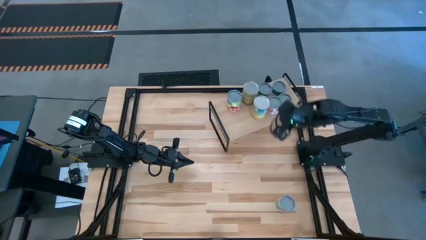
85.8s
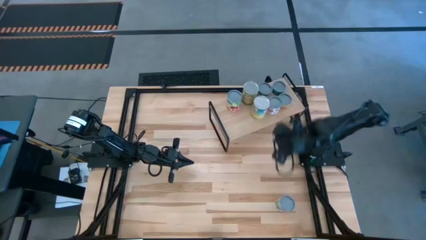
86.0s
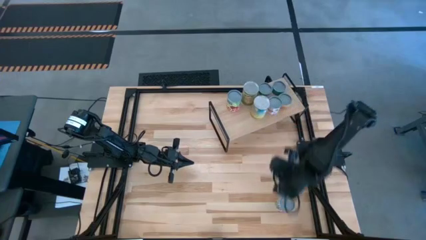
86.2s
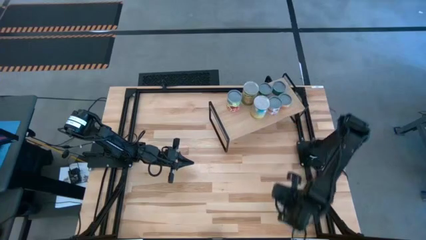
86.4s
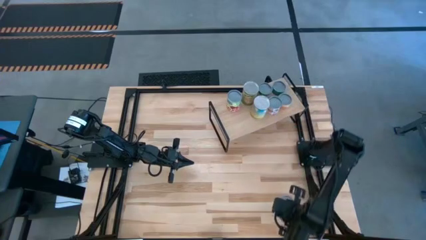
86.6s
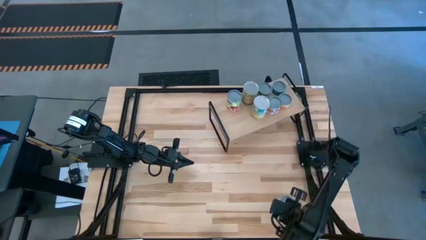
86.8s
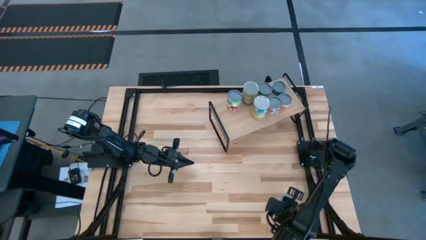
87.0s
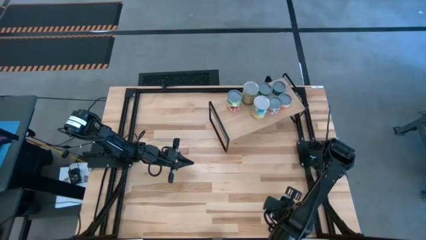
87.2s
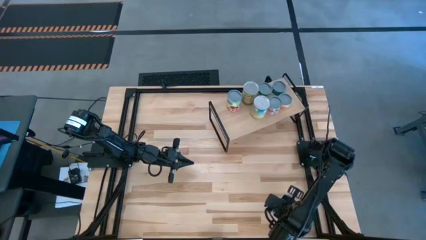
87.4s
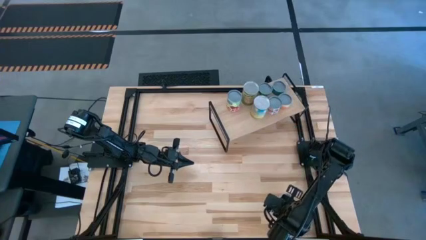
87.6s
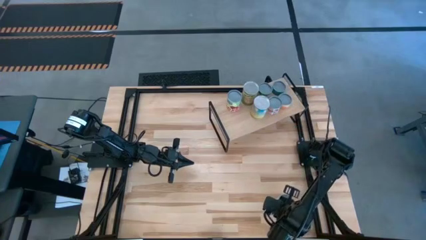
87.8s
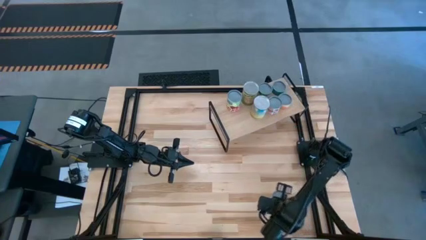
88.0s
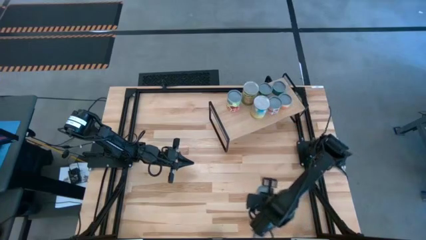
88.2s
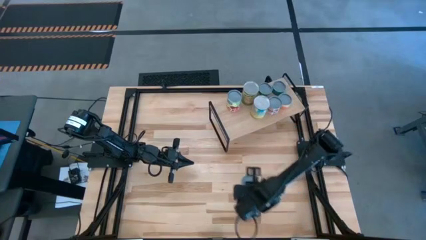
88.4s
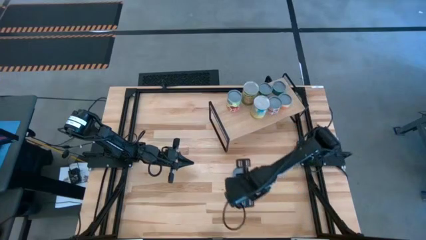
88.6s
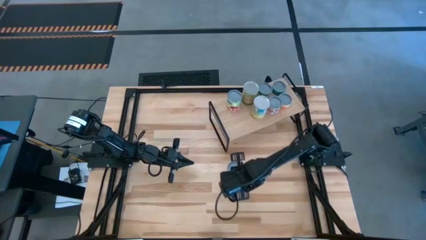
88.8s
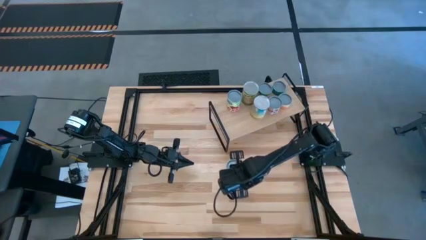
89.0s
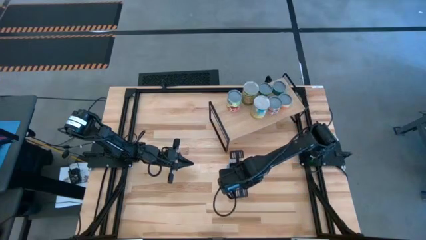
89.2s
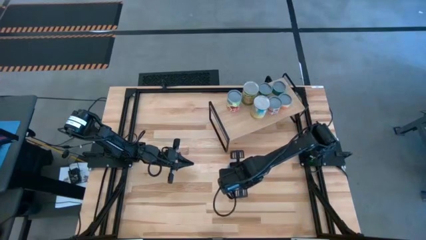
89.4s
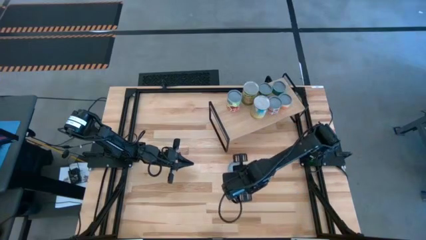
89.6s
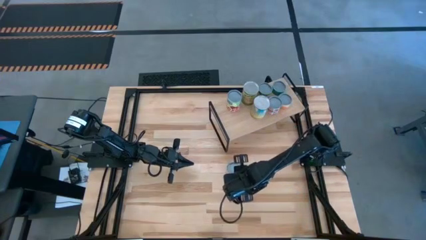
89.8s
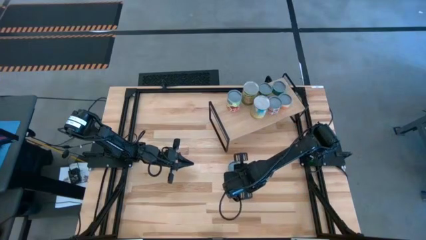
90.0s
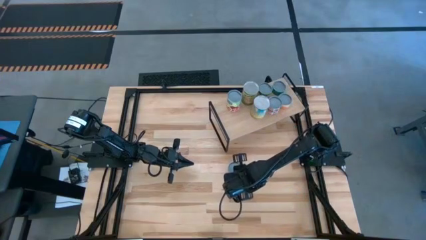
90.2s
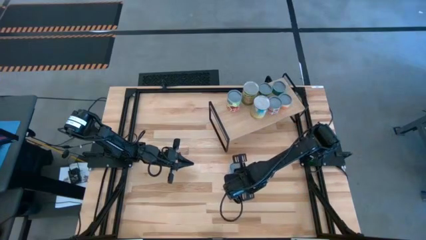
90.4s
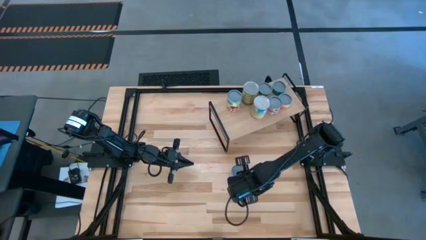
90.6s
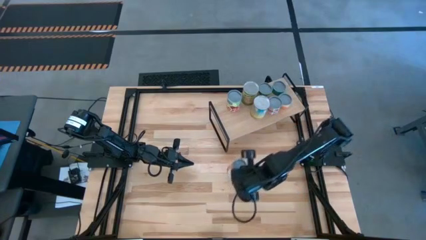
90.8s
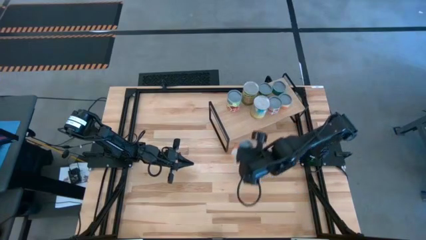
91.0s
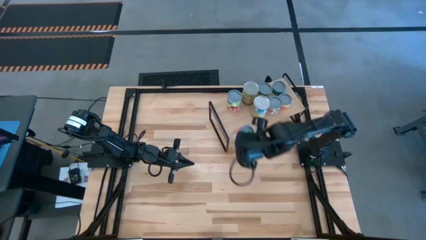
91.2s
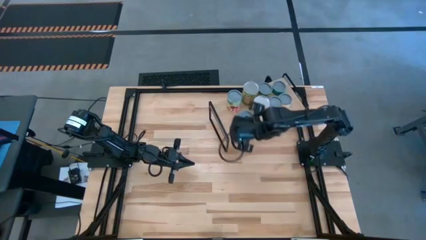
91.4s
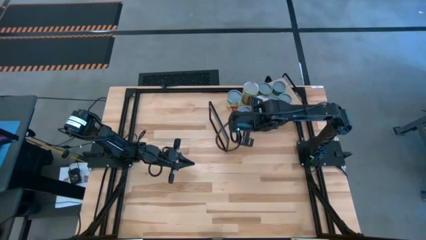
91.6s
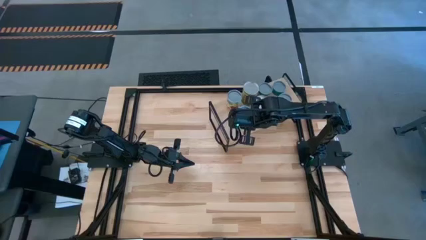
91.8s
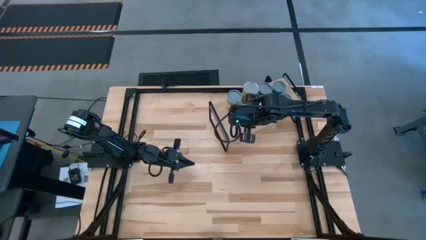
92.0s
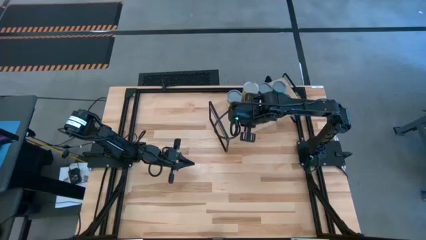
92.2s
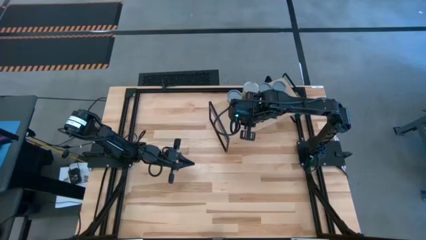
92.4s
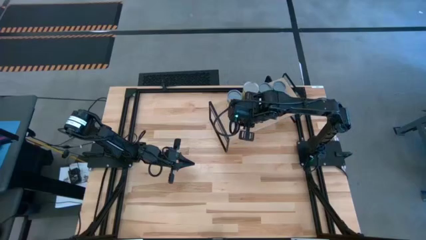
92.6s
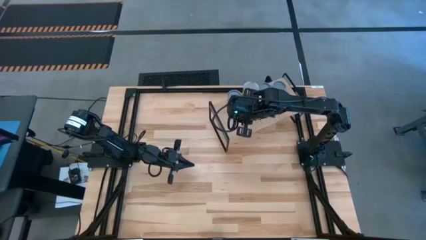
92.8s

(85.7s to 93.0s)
Task: Pick and place cans onto a shelf
Put the canned mixed fruits on the shelf

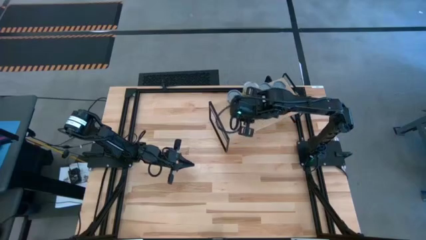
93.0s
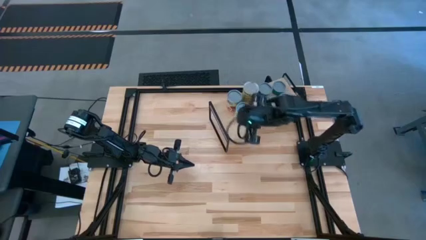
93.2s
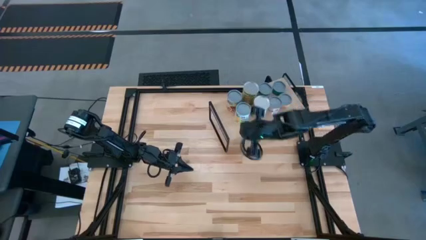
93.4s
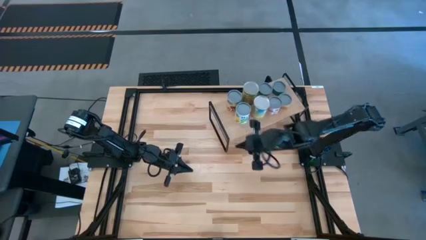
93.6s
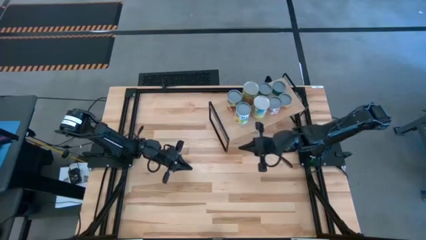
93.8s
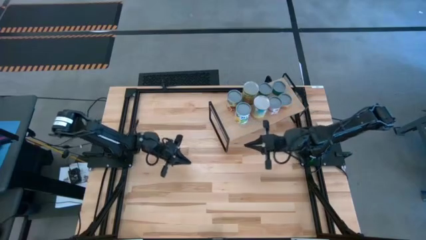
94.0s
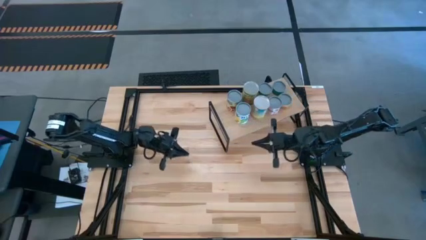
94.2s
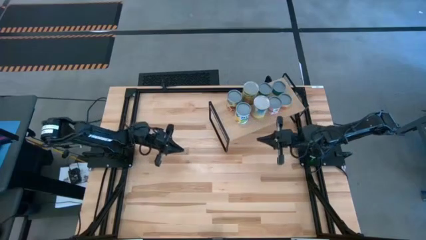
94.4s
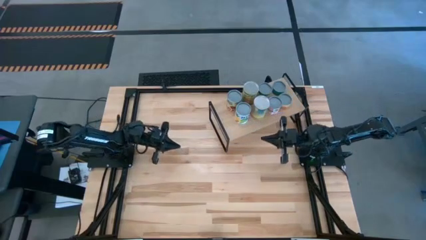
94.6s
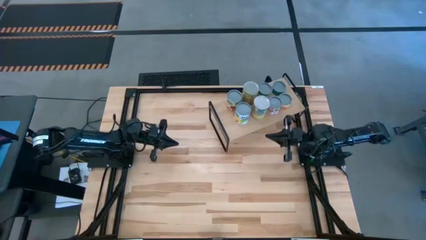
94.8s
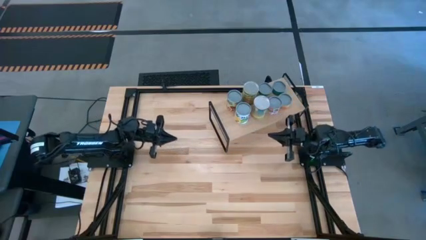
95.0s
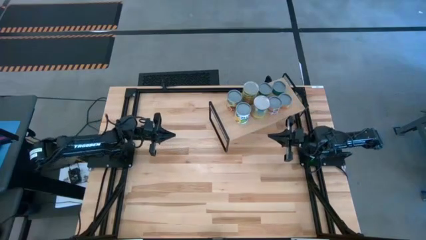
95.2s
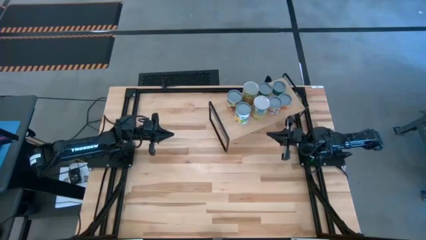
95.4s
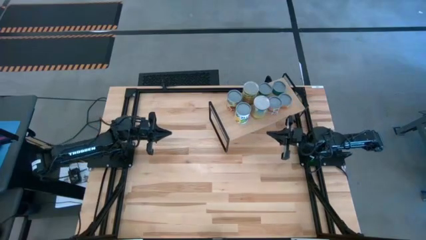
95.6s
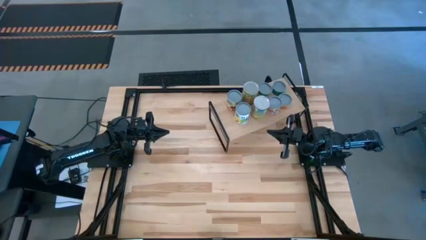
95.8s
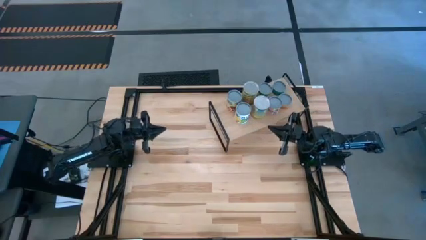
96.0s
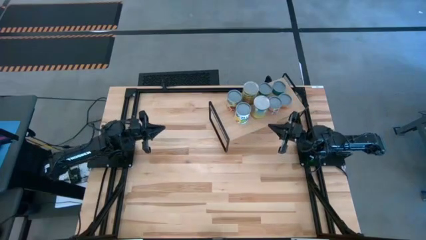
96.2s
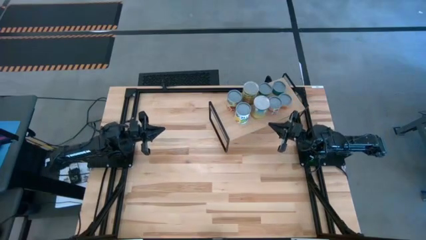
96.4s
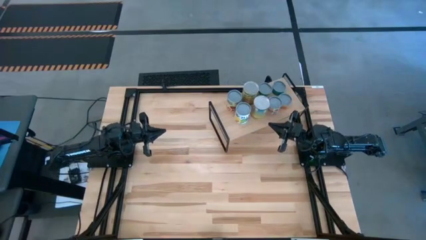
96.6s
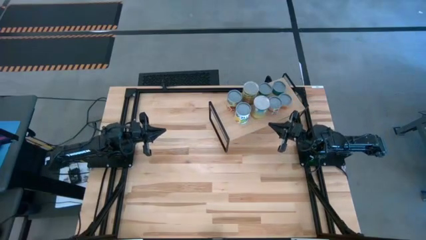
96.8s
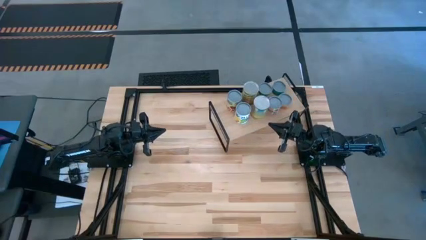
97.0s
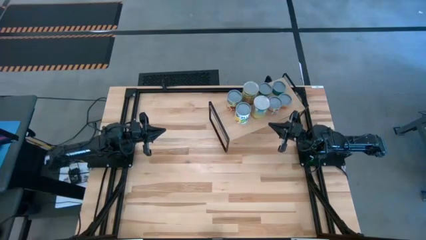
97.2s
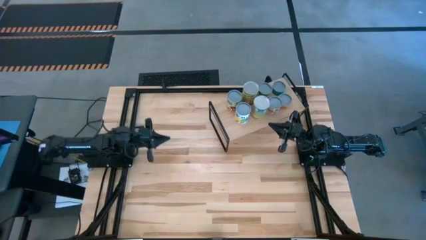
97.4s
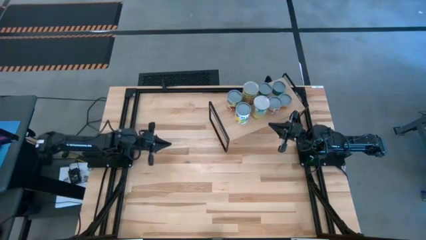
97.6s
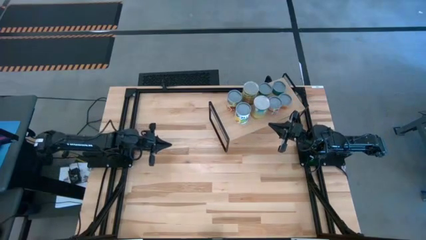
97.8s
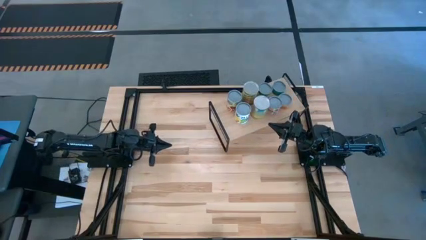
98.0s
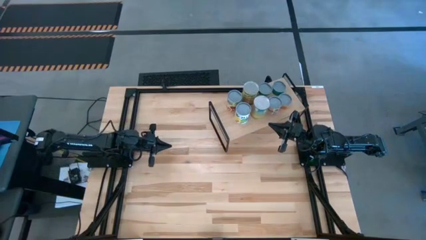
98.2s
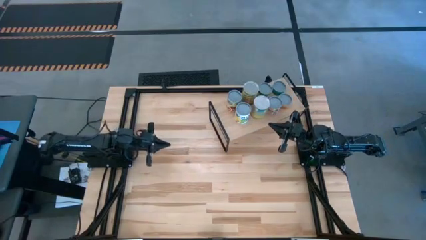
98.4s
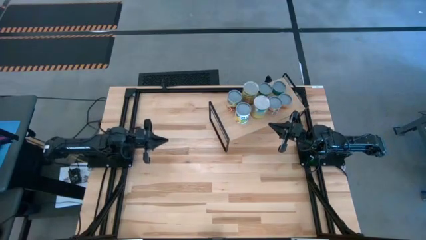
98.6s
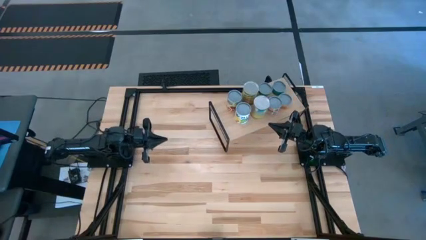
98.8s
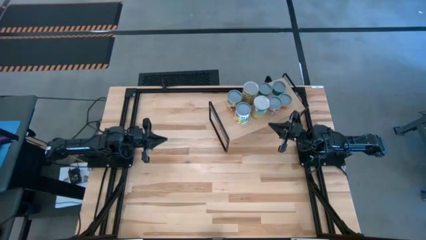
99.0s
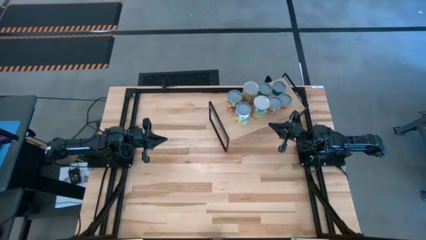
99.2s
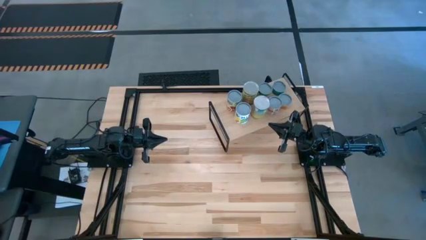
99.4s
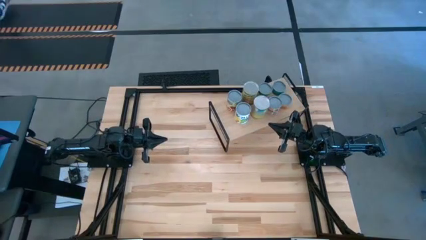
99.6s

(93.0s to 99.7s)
Return to Home Position
